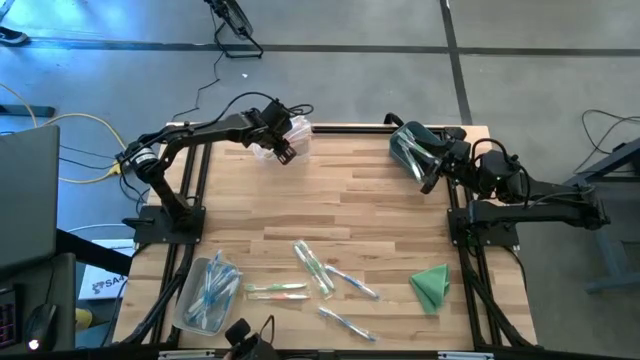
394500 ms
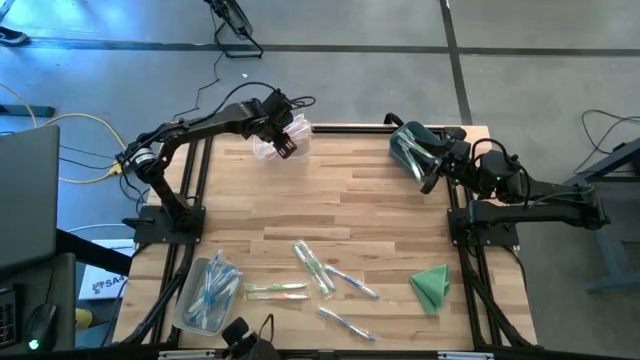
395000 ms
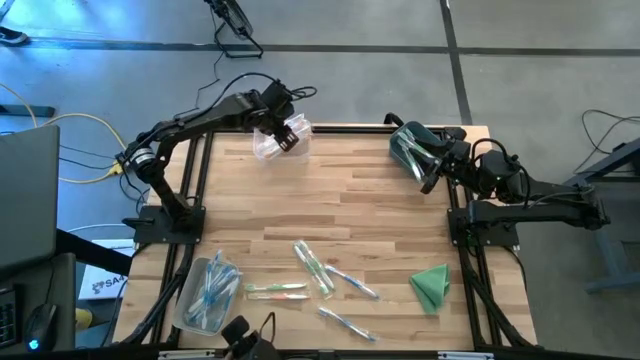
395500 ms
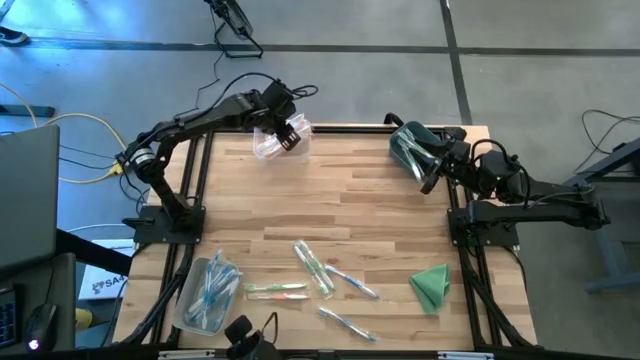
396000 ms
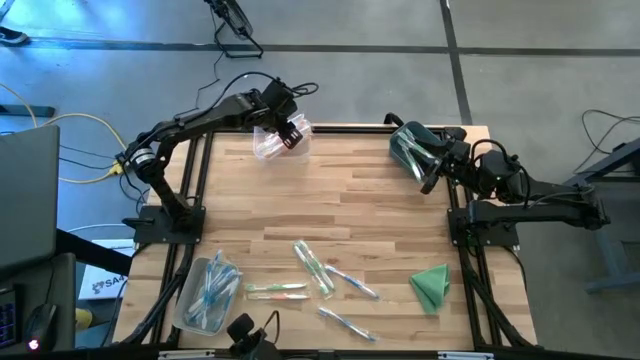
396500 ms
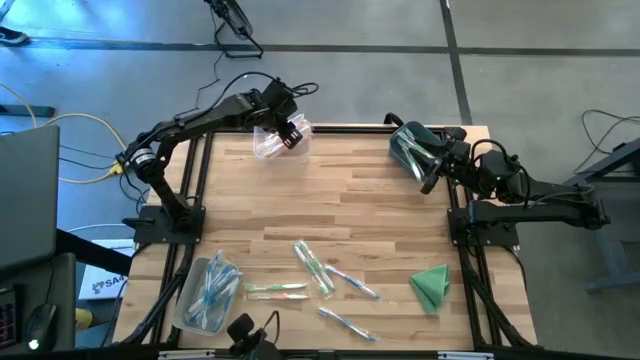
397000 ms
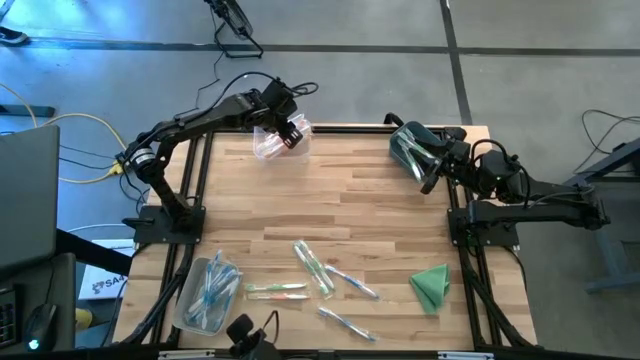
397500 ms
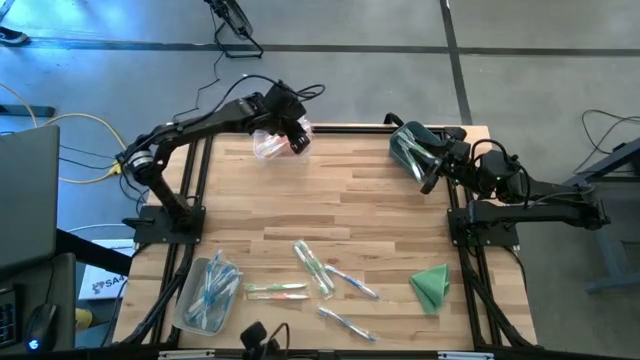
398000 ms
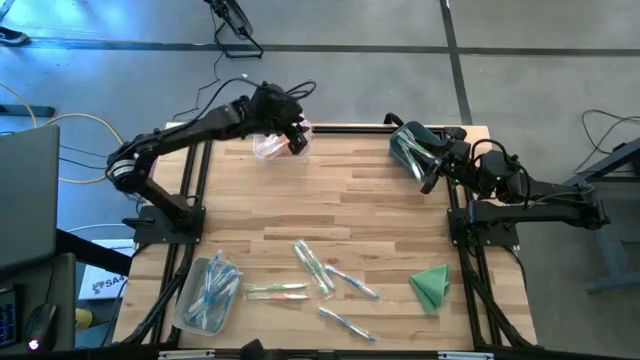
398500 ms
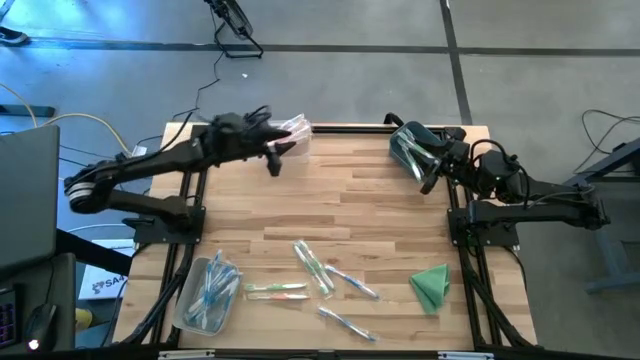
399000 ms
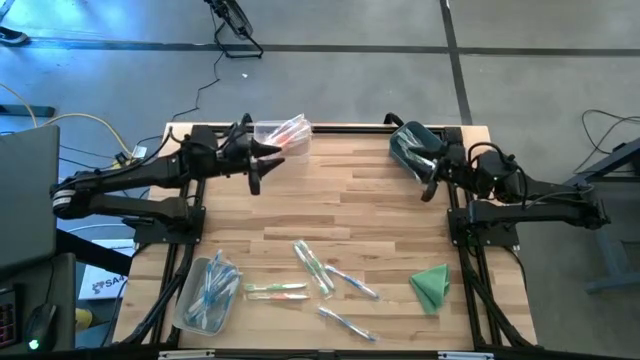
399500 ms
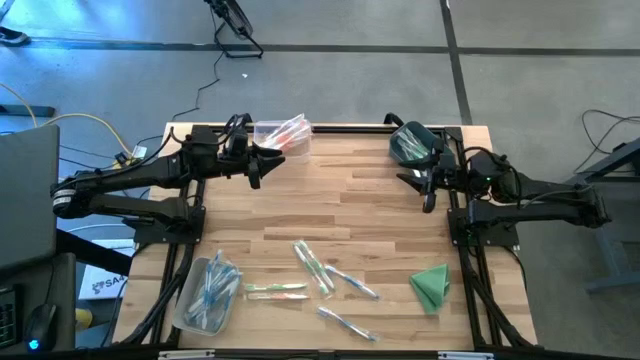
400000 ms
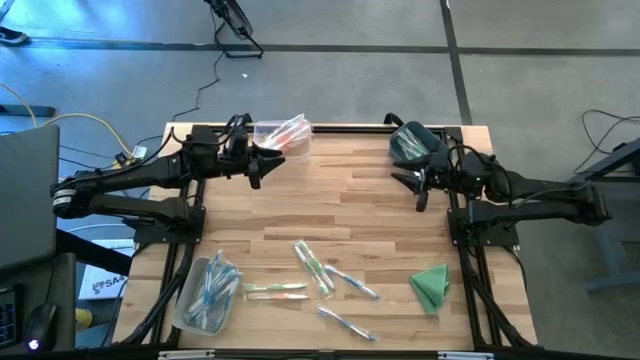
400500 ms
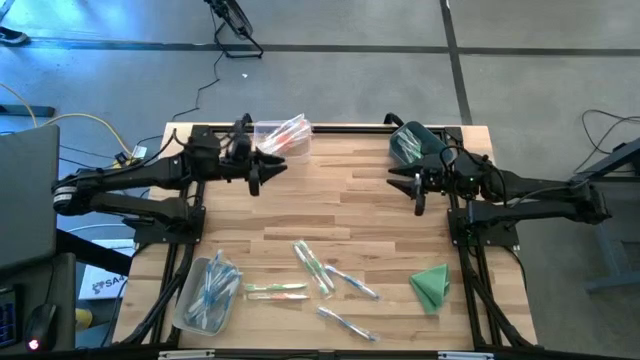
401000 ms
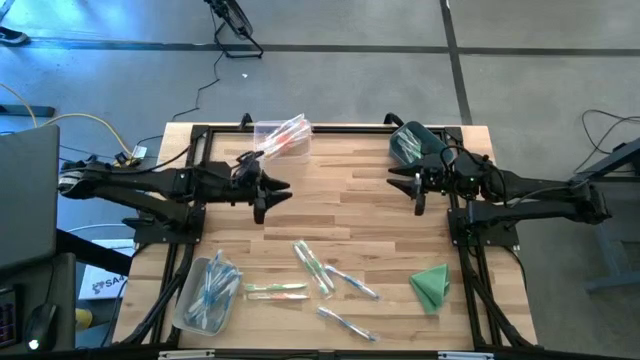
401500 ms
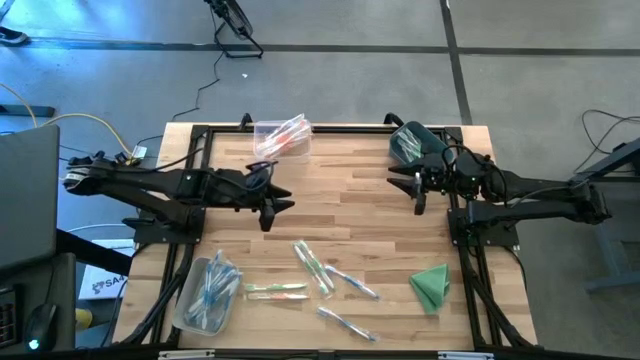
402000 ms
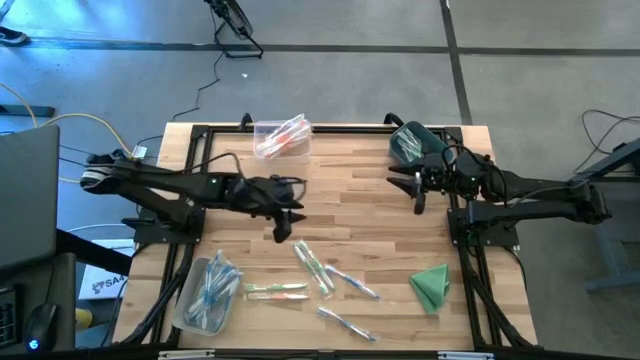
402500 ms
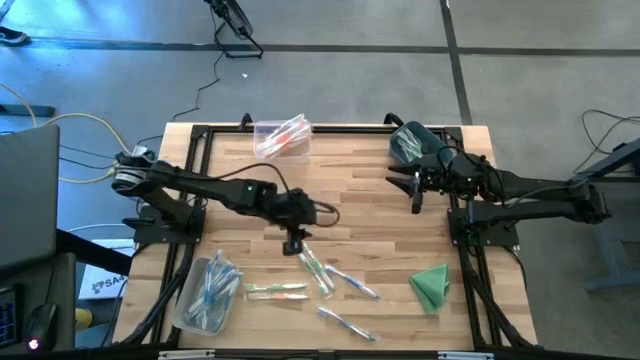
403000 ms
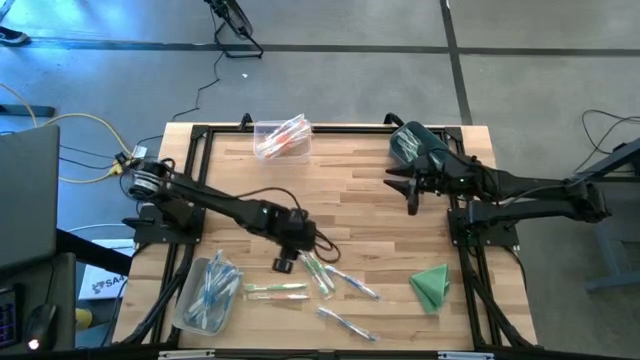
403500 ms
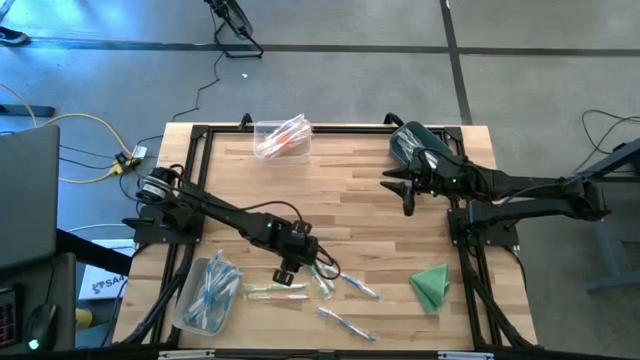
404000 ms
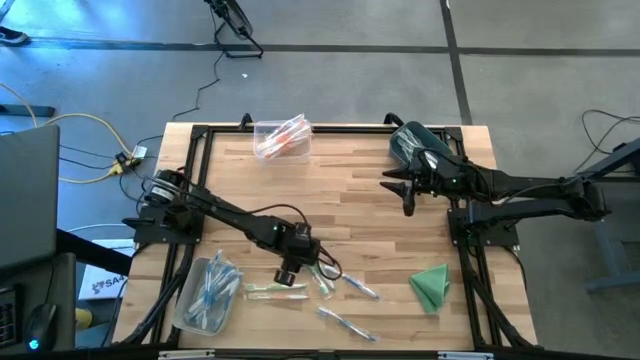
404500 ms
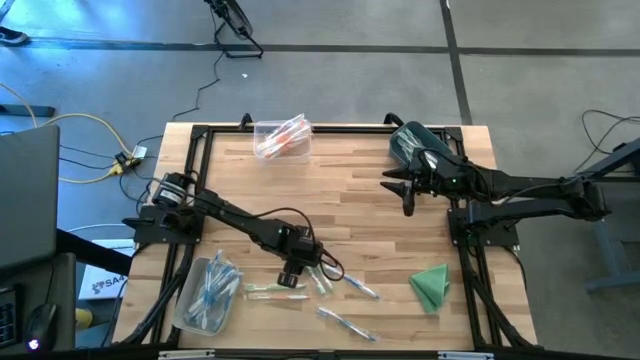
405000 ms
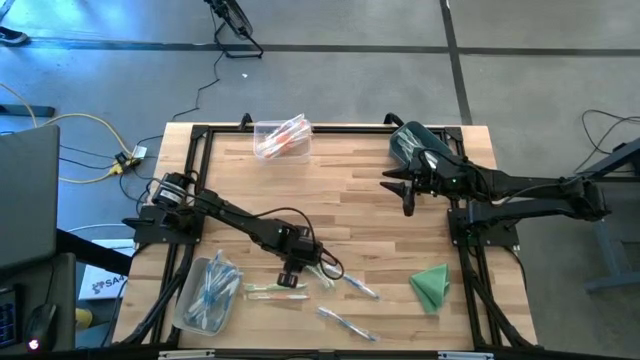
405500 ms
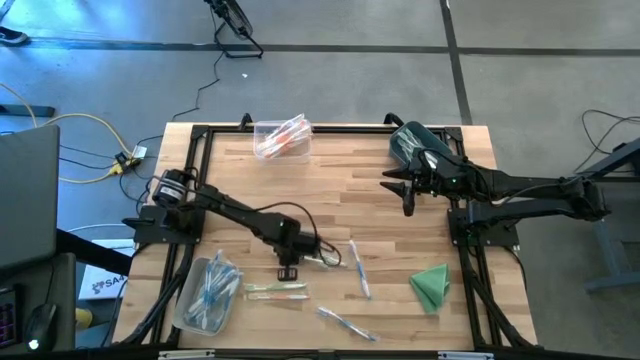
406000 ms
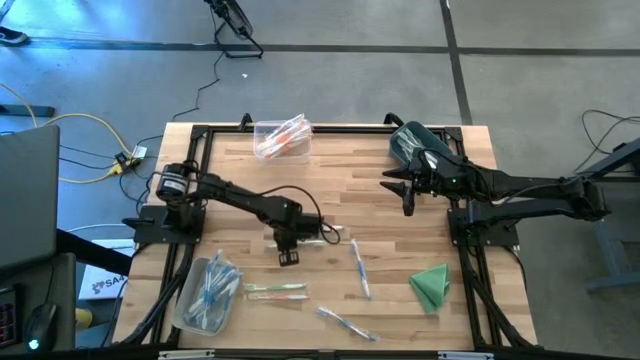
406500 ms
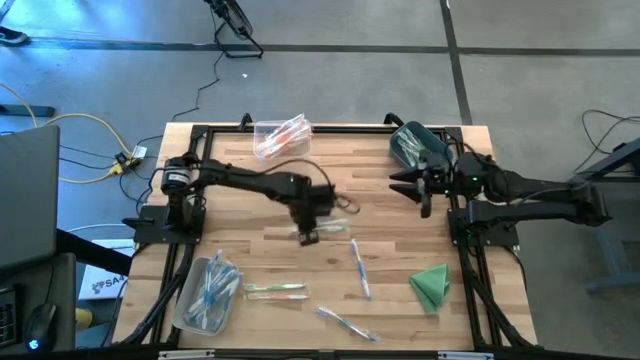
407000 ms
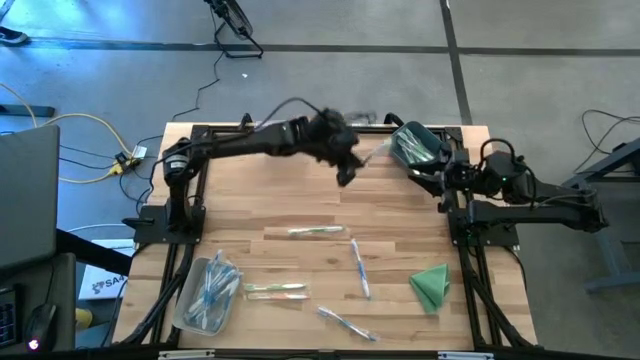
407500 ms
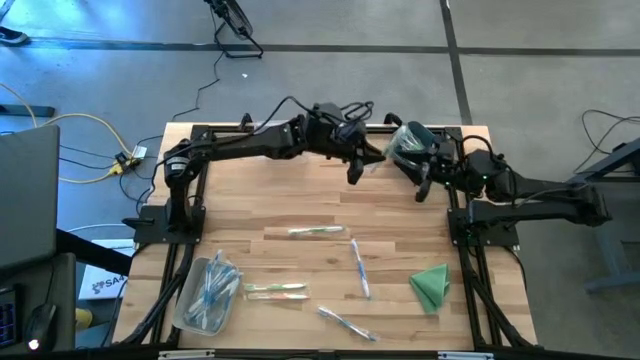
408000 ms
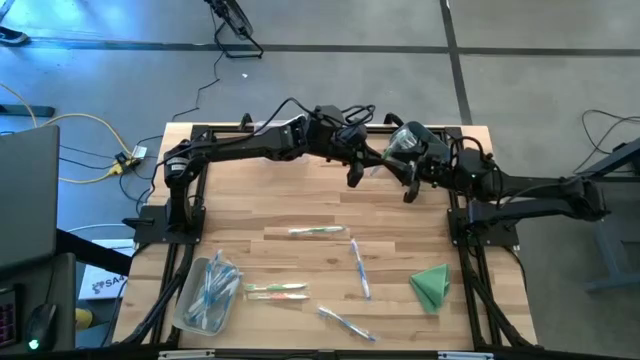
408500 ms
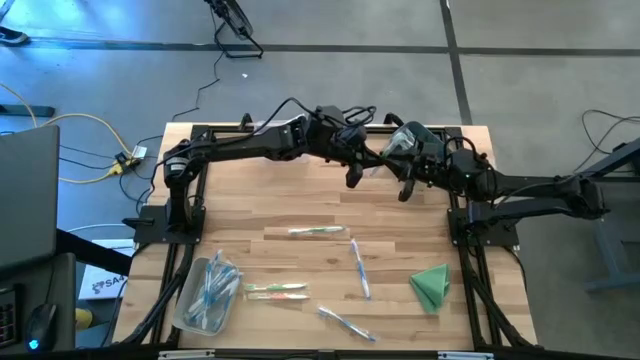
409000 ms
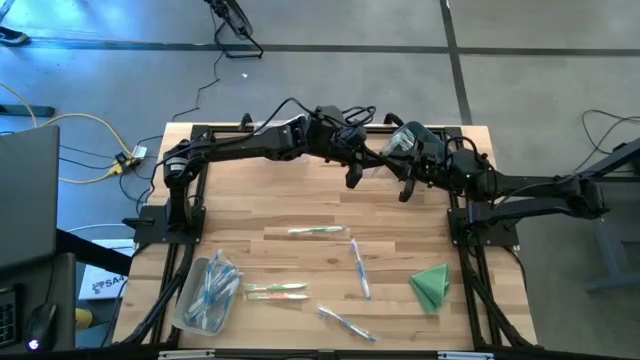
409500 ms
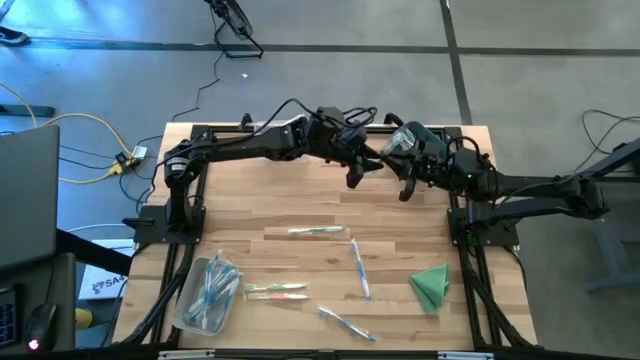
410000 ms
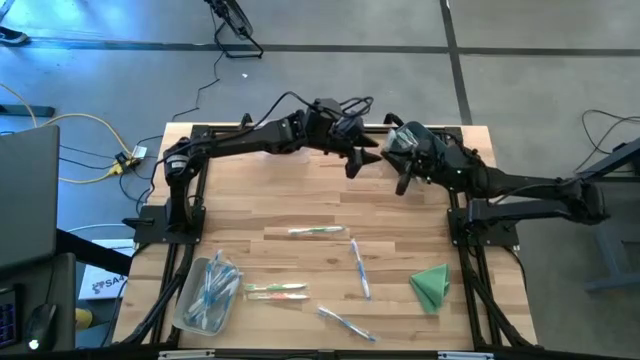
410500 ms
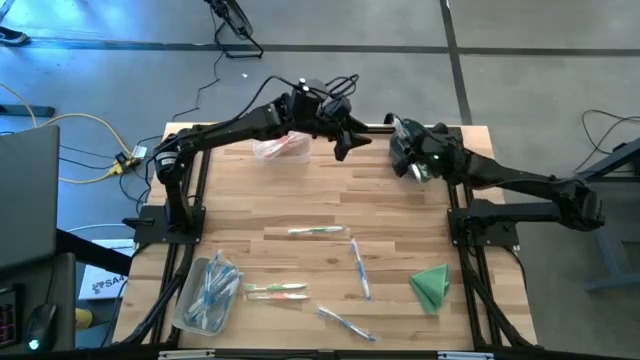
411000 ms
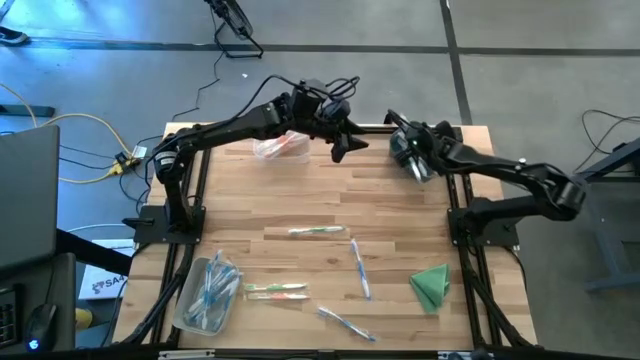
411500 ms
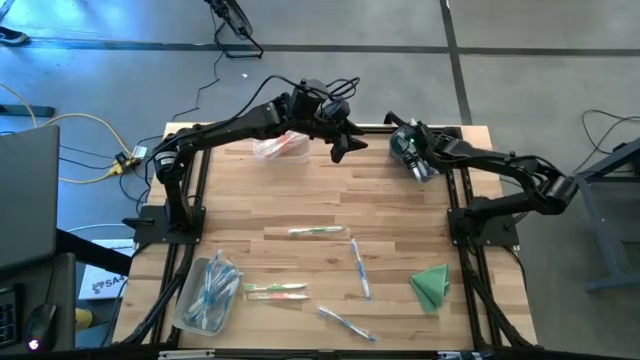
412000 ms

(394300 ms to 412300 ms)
Task: Pick & Place Toothbrushes
Put the middle green toothbrush into the blue bin
